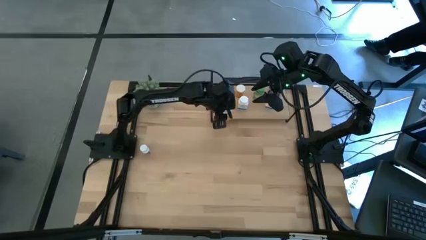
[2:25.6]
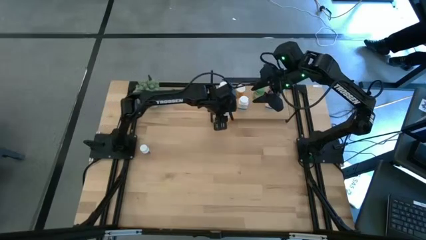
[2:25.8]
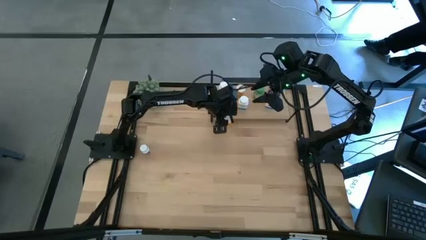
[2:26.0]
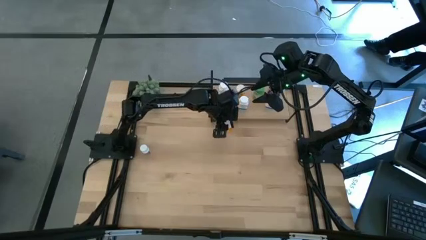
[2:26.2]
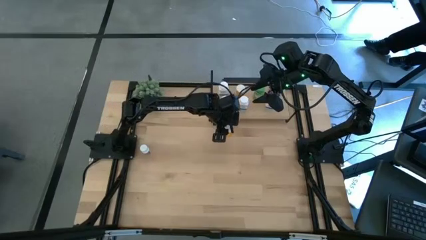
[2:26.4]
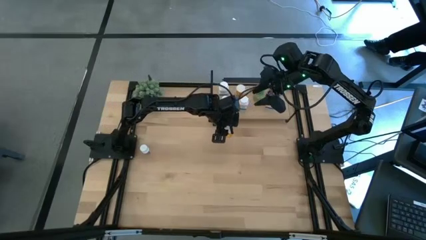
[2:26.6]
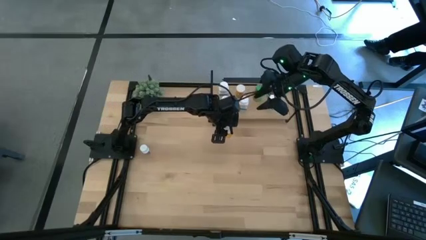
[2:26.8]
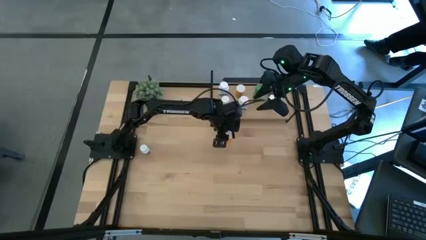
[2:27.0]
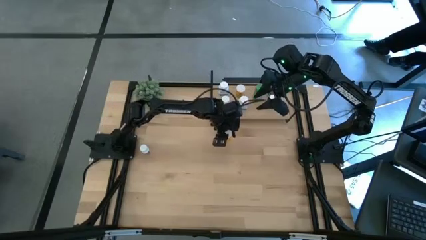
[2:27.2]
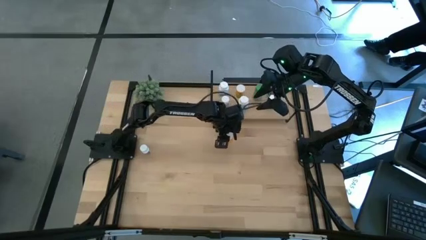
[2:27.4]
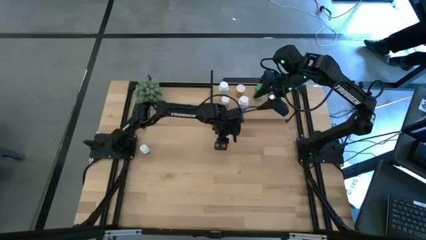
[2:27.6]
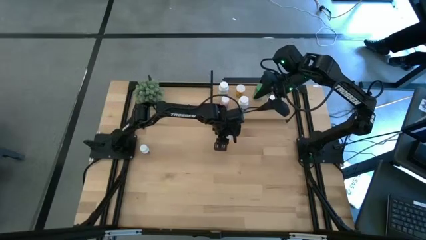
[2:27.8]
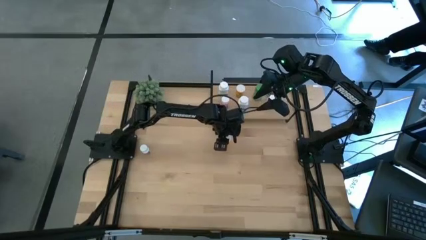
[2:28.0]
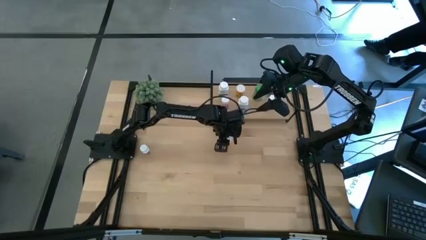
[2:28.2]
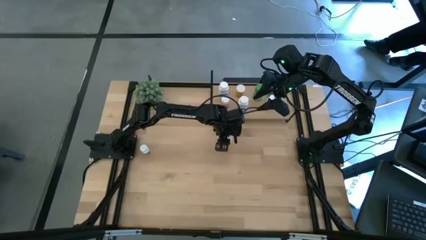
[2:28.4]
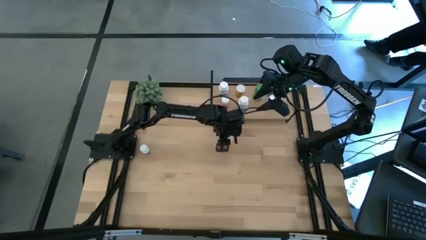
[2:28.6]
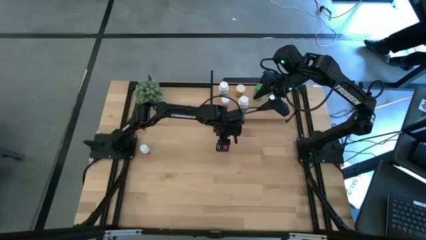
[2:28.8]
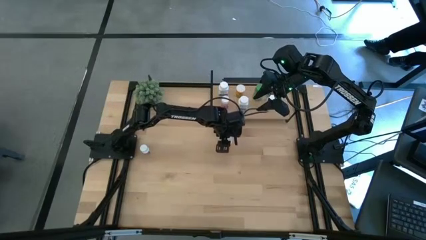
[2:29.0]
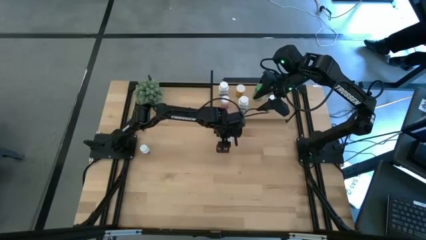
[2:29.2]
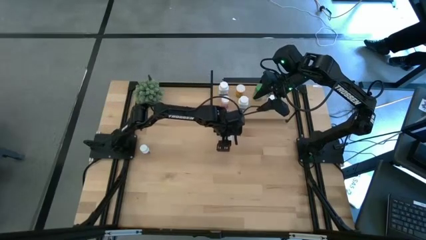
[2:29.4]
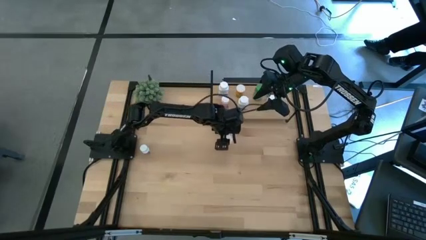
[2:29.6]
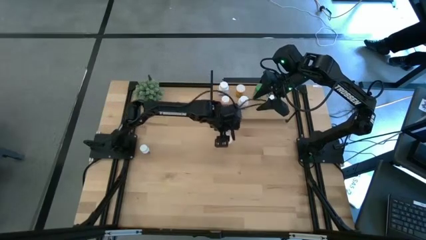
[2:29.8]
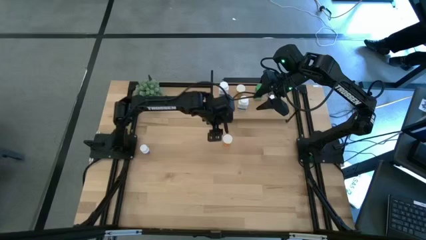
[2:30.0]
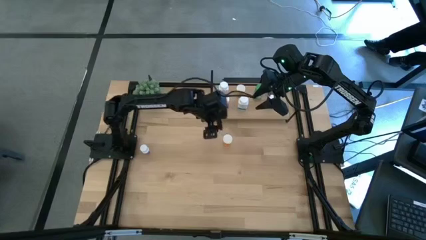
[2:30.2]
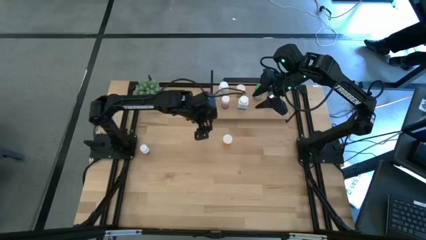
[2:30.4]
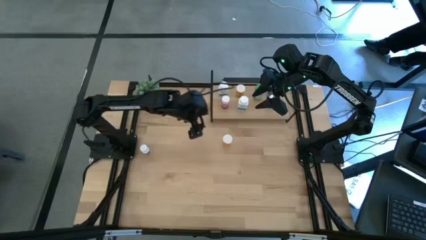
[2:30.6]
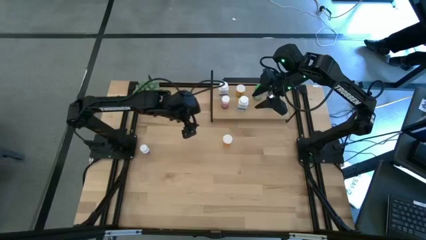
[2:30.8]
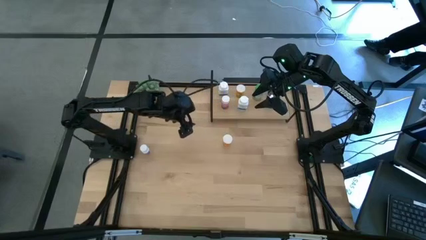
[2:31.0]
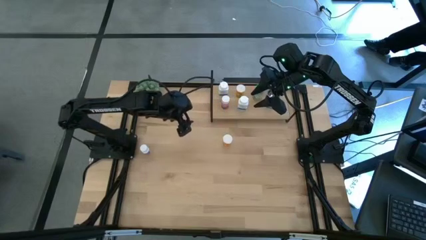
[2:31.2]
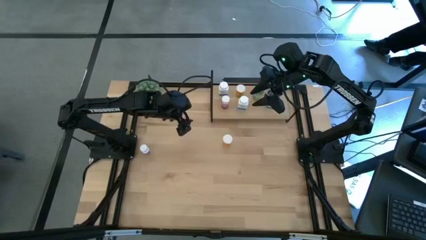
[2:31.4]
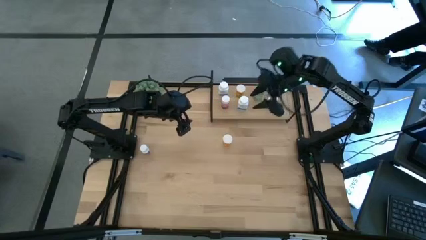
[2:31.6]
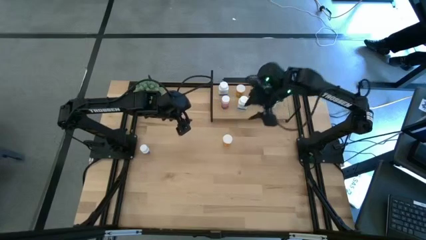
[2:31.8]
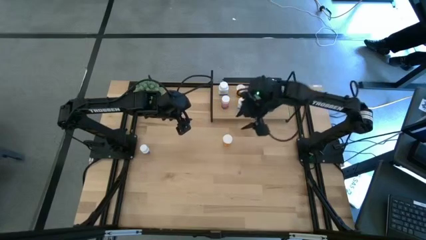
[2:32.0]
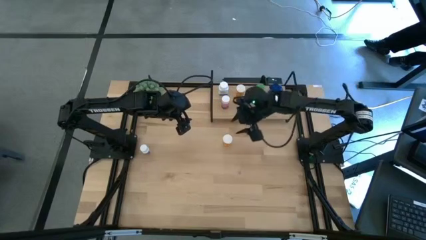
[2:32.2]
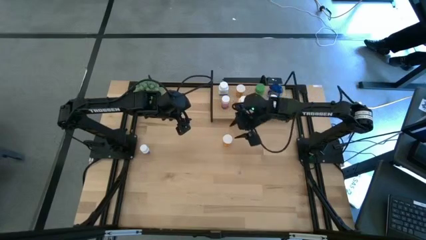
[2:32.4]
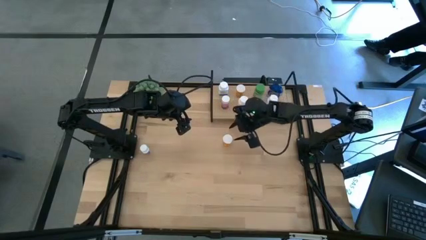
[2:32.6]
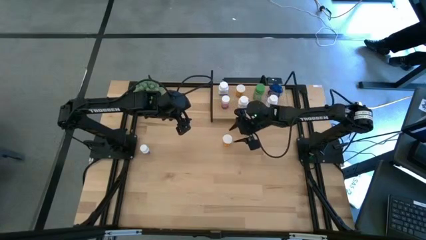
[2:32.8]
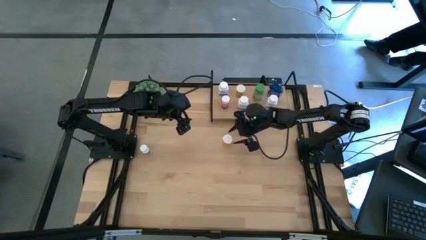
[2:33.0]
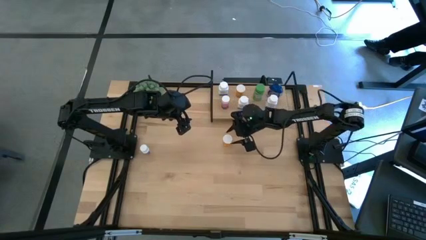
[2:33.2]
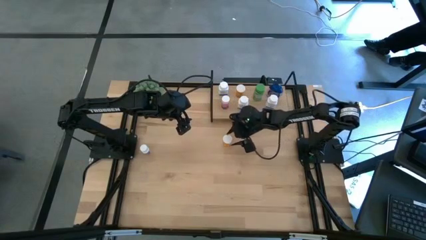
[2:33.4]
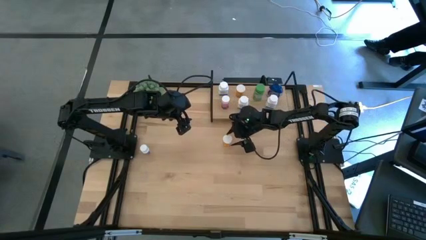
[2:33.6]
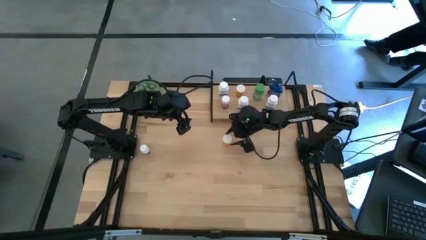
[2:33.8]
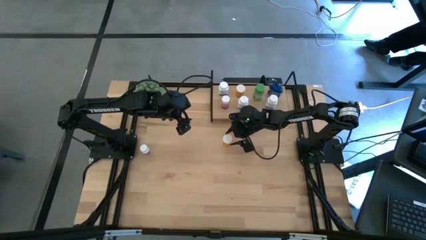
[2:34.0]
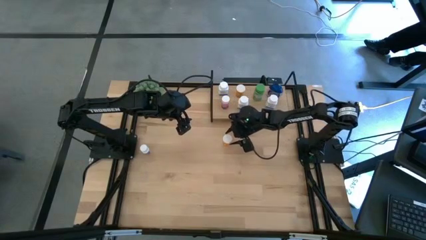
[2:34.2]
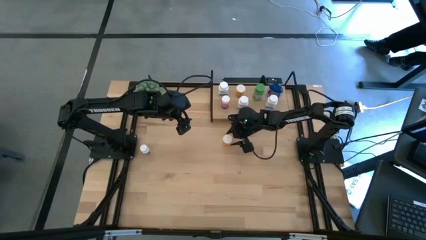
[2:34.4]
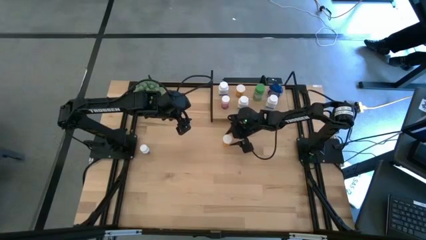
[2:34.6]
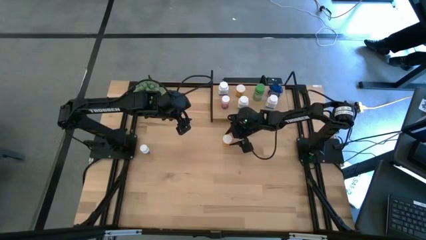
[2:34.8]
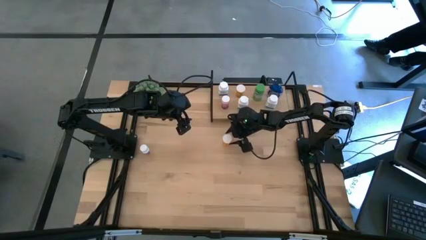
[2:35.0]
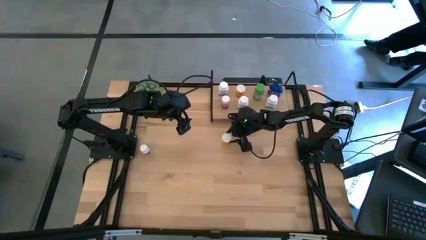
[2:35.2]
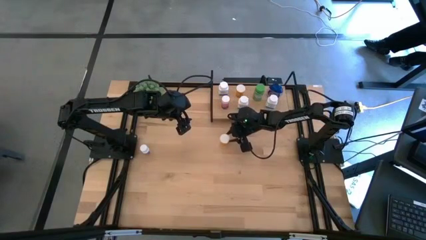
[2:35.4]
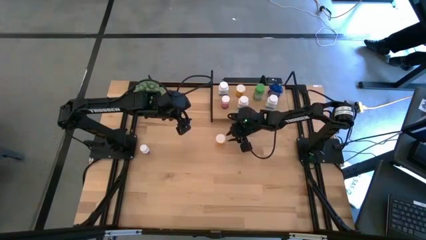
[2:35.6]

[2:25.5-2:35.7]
Task: Pick and place medicine bottles onto shelf by color
Put the orange medicine bottle on the shelf

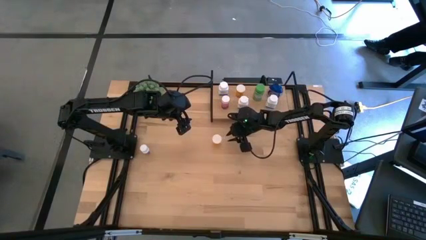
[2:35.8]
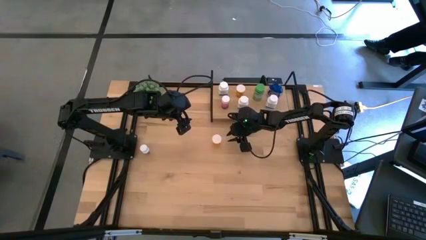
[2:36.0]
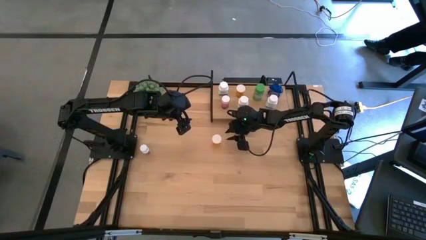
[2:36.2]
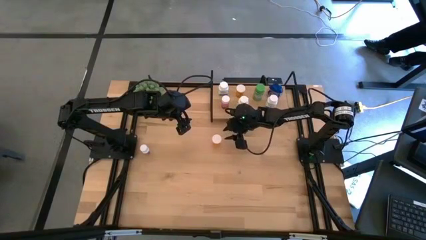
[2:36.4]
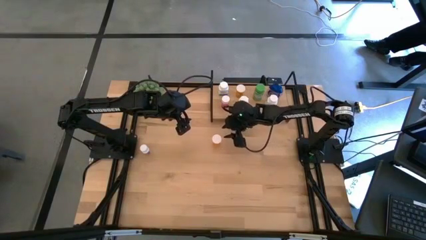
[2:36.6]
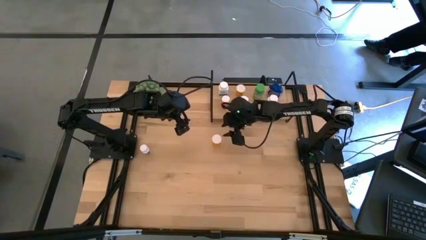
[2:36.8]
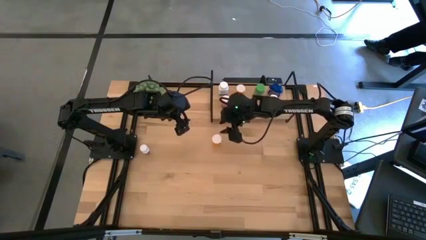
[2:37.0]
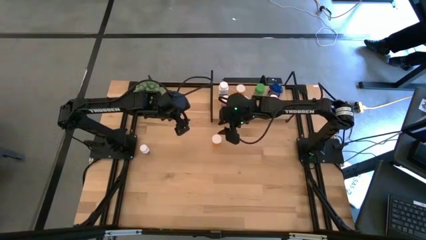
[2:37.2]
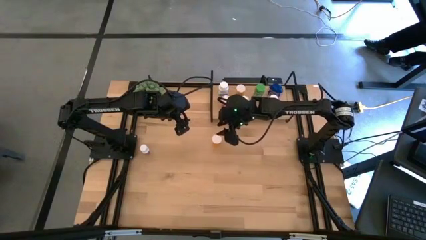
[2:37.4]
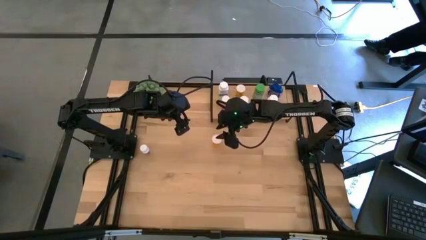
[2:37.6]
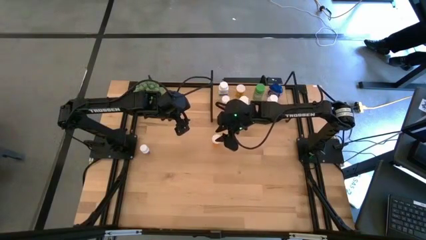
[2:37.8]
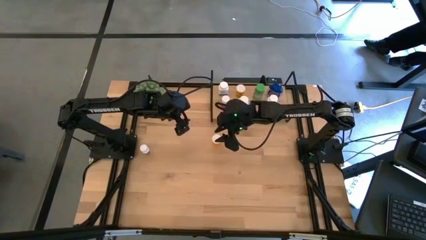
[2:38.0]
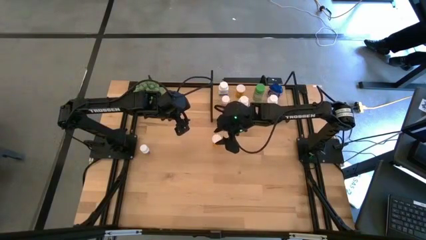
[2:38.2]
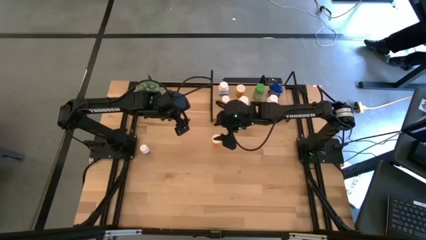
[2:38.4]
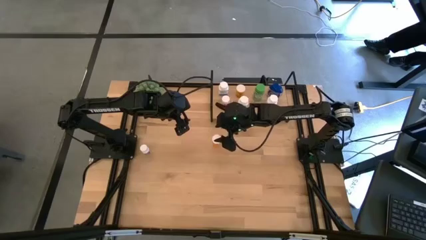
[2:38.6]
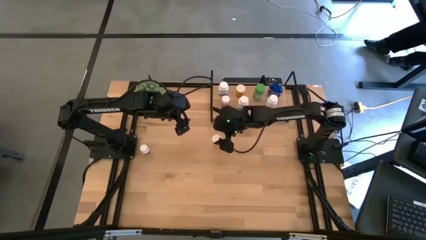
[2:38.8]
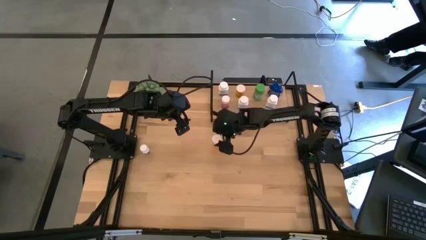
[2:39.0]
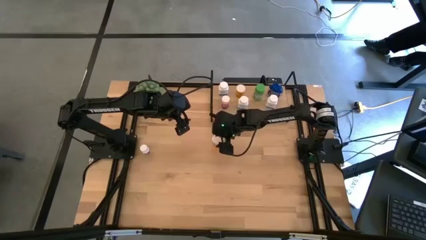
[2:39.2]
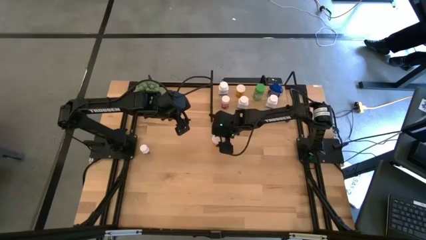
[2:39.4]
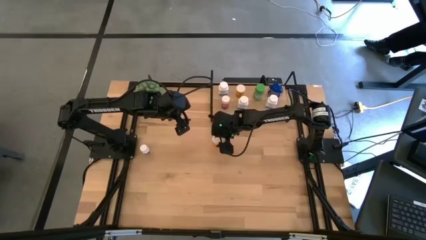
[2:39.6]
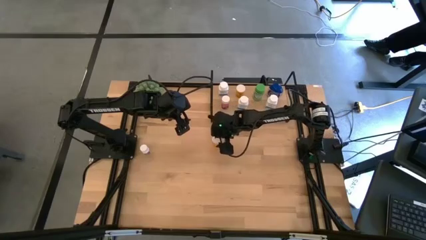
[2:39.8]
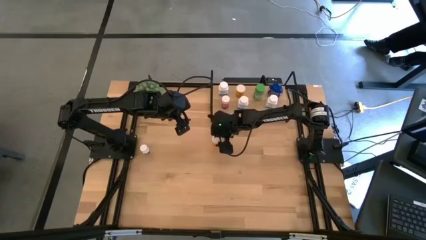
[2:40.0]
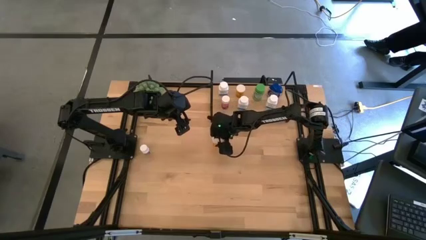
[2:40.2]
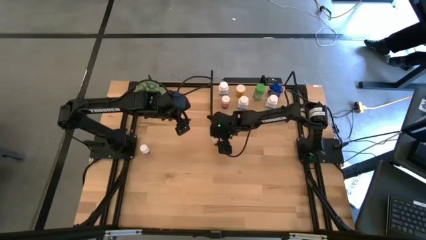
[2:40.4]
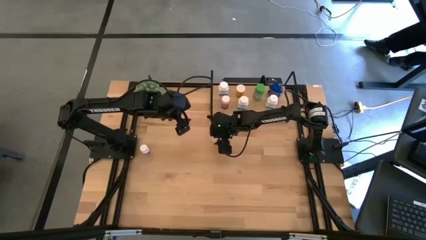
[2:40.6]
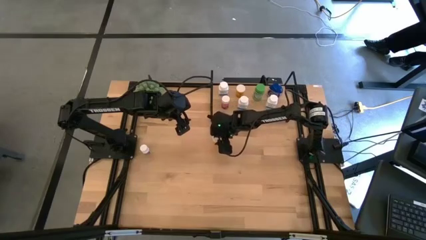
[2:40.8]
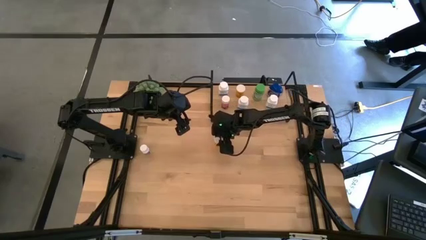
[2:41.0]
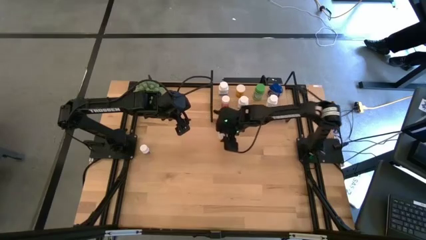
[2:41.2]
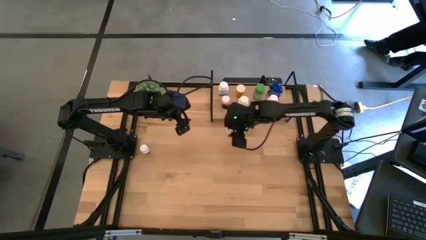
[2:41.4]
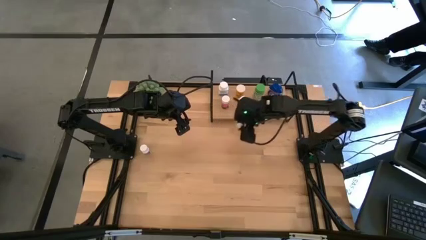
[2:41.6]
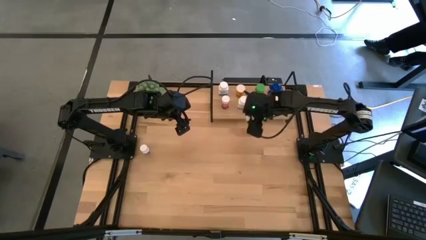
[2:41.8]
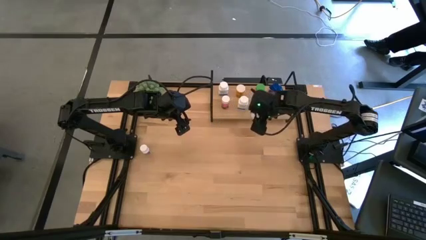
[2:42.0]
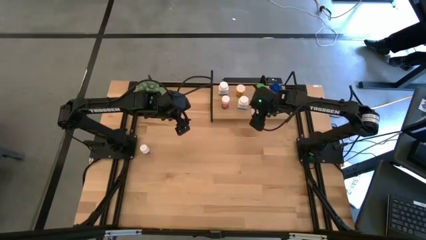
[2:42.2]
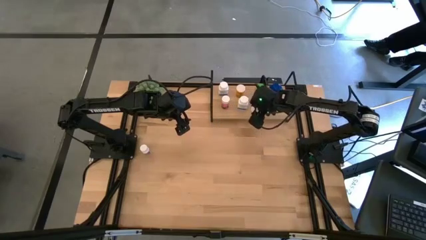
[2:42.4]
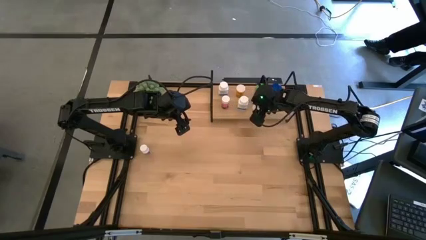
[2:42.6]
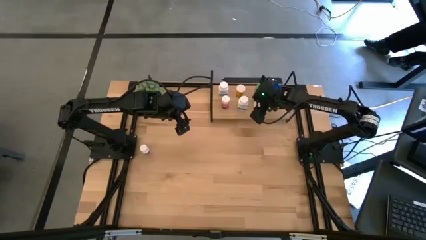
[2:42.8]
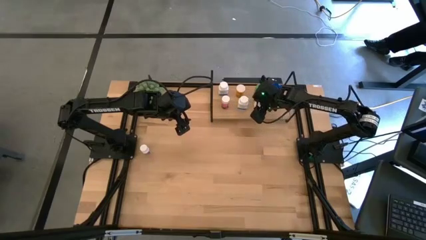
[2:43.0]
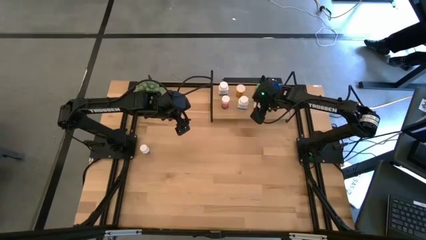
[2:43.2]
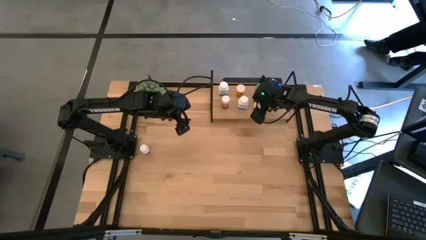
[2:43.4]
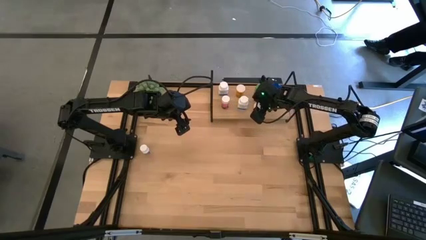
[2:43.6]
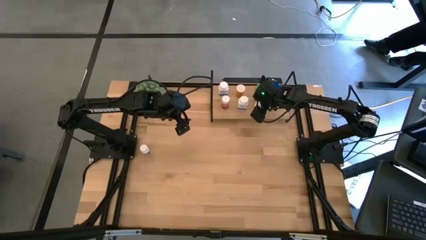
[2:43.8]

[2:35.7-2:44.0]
Put the orange medicine bottle on the shelf
